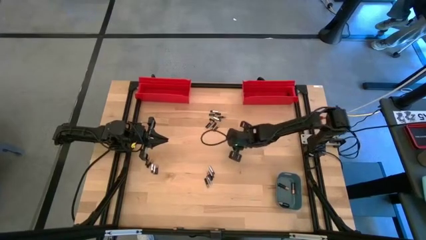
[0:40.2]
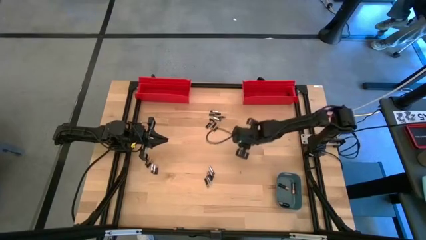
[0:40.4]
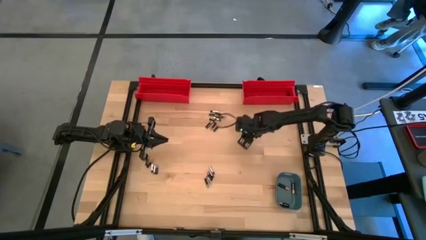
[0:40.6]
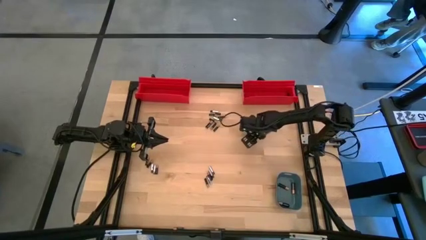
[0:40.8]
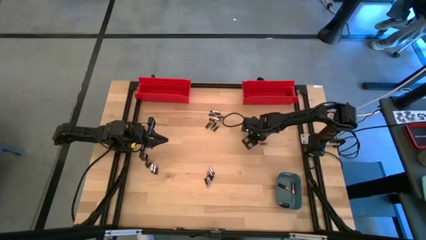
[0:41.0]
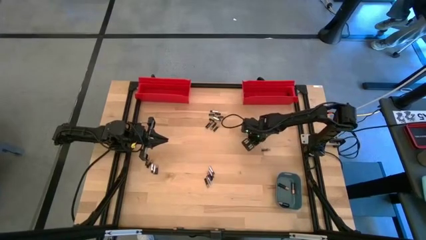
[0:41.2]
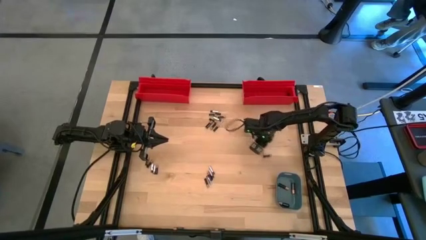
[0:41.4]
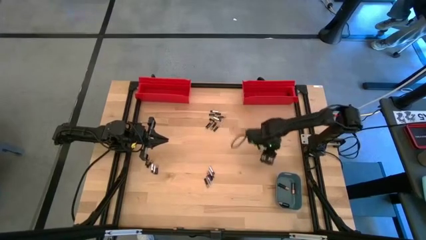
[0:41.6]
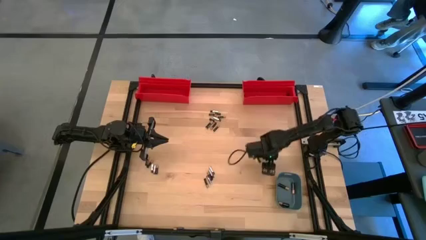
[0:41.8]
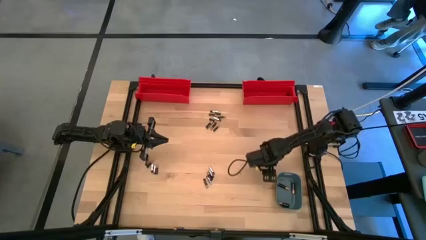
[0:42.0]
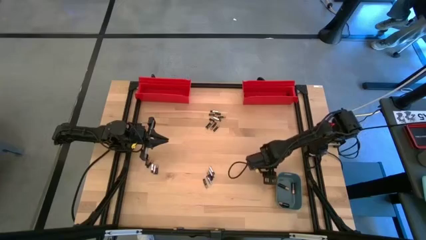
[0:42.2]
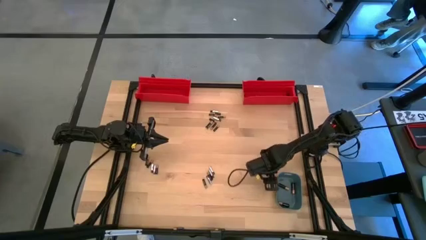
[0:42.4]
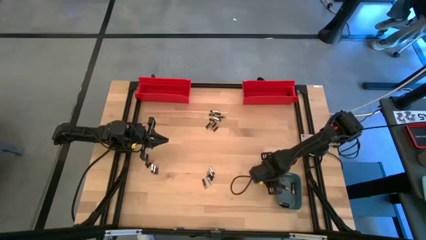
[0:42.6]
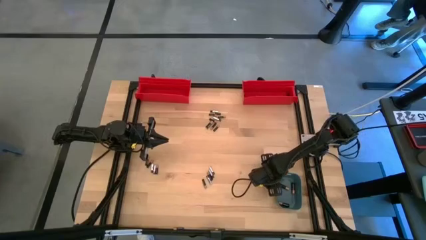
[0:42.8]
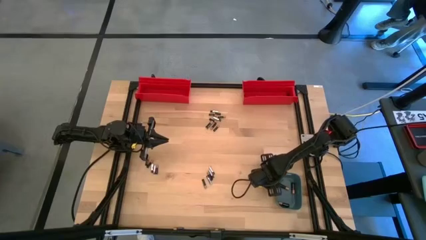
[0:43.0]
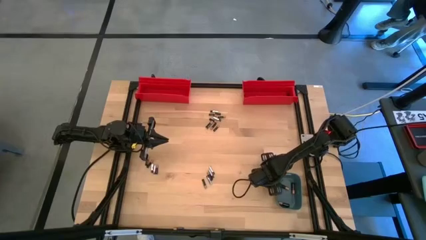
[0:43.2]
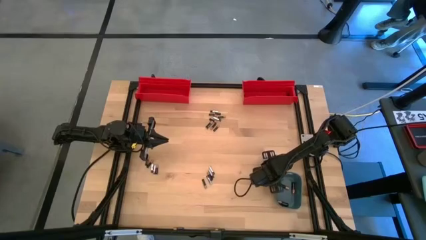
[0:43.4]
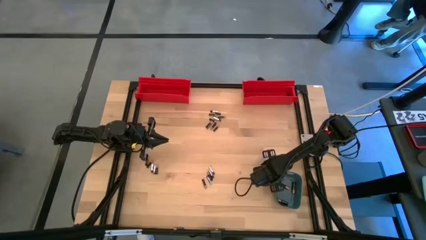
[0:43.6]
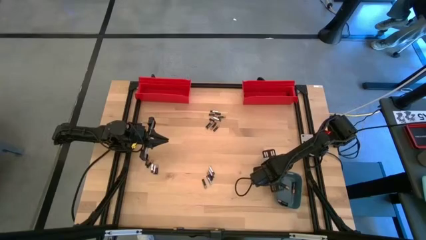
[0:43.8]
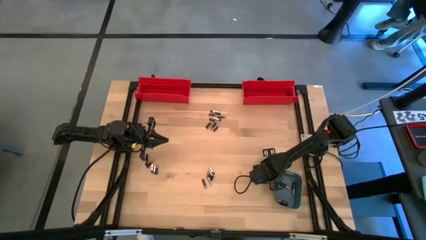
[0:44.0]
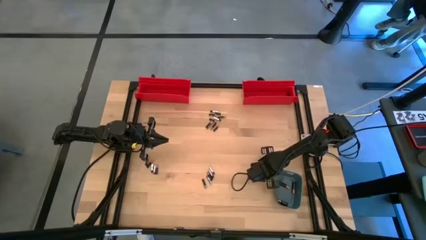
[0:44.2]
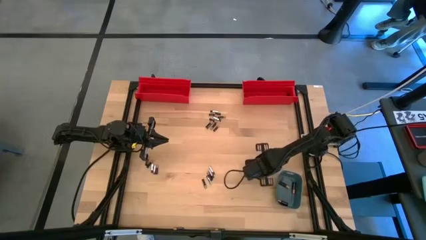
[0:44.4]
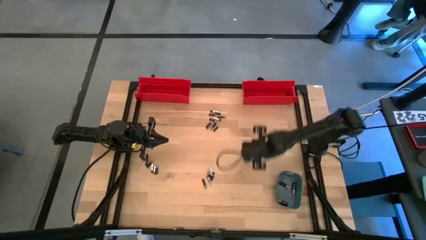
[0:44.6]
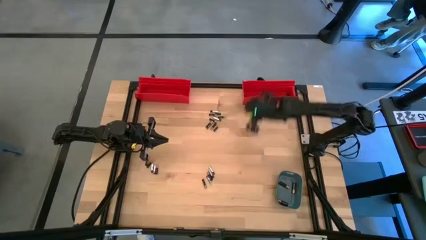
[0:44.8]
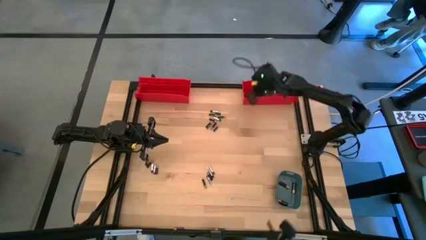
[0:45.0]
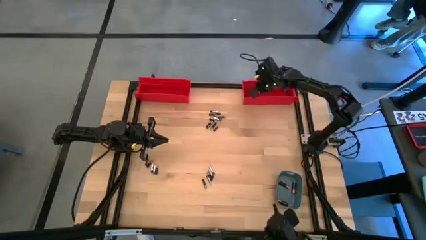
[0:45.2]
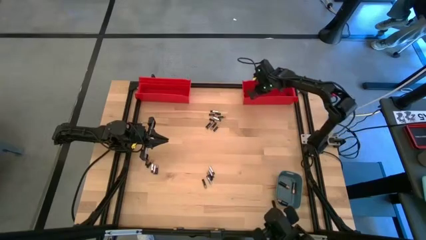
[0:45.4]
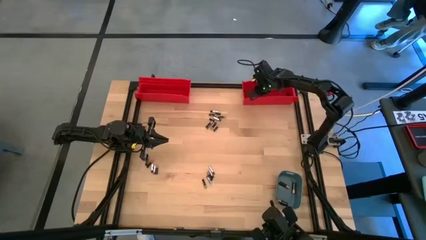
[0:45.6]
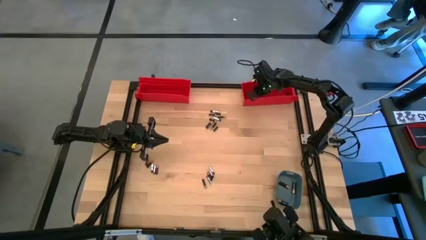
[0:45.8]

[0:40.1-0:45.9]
Task: Sort batteries
Put the small black battery into the right red bin

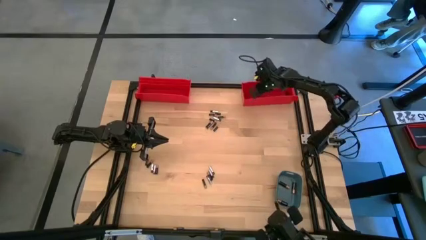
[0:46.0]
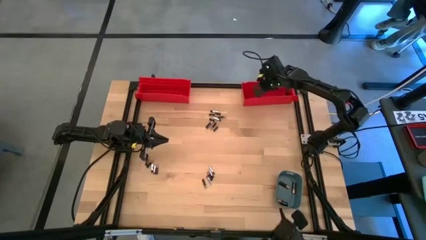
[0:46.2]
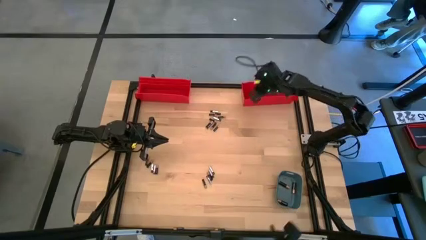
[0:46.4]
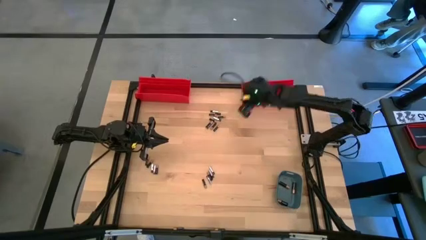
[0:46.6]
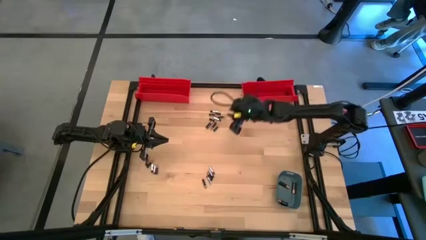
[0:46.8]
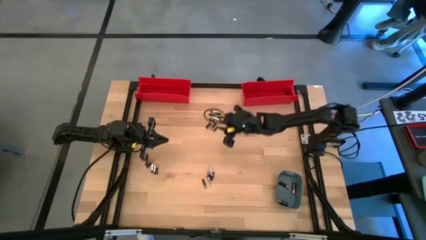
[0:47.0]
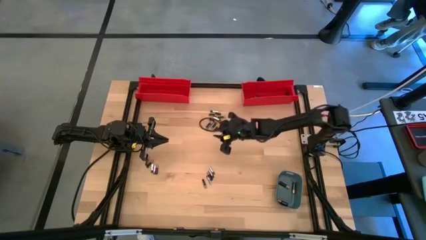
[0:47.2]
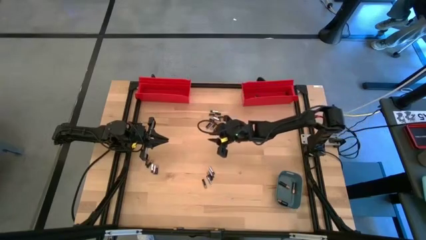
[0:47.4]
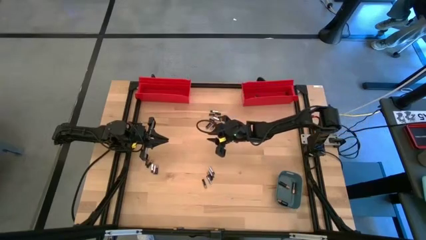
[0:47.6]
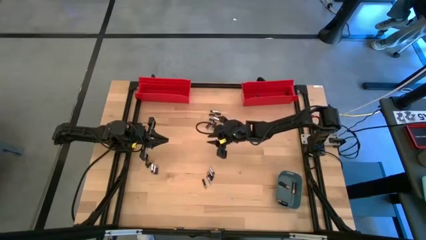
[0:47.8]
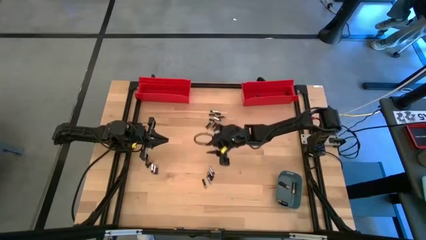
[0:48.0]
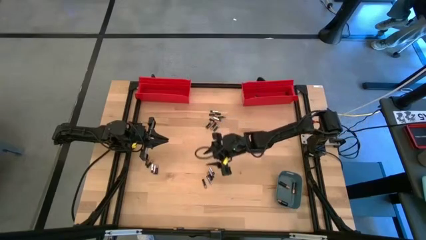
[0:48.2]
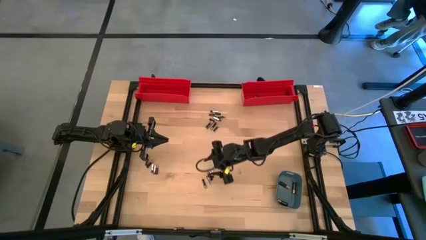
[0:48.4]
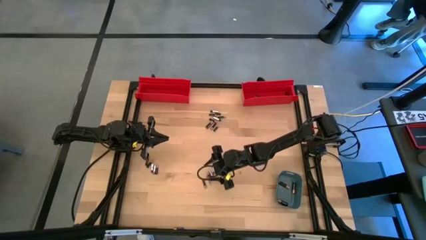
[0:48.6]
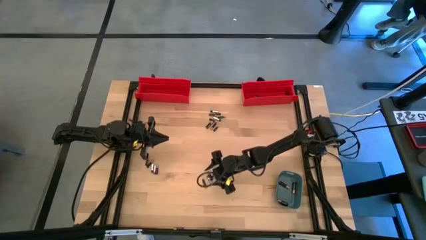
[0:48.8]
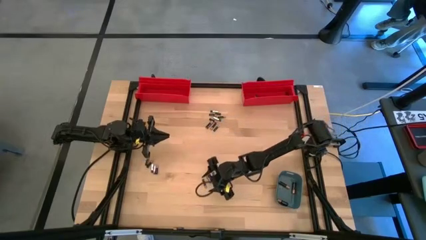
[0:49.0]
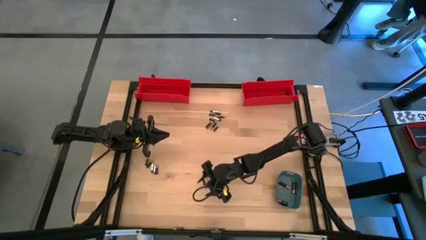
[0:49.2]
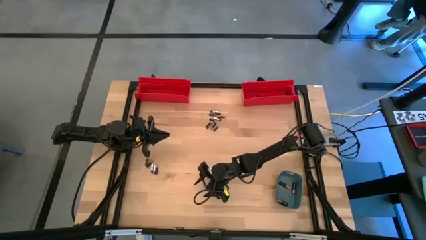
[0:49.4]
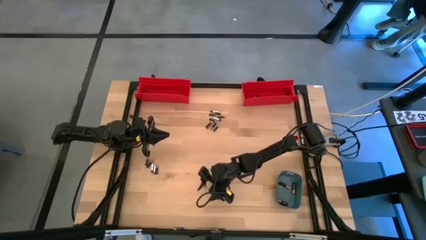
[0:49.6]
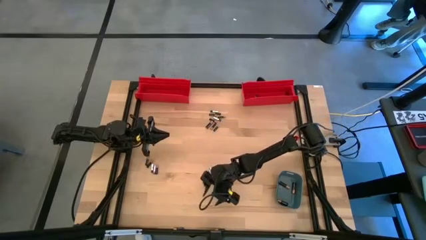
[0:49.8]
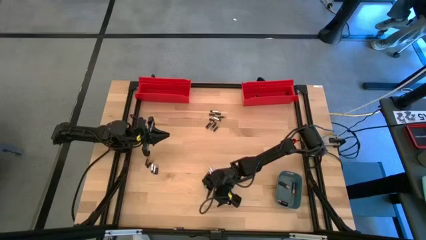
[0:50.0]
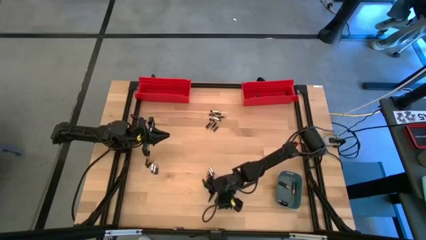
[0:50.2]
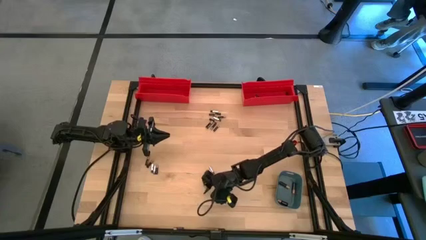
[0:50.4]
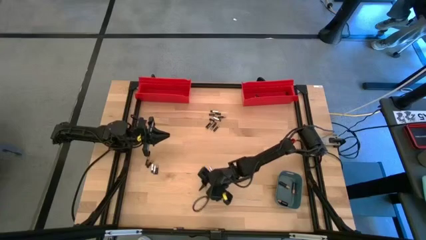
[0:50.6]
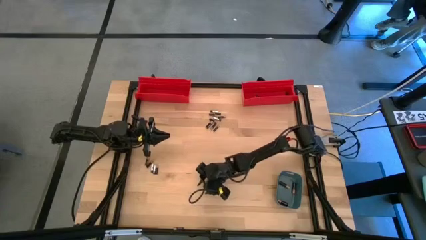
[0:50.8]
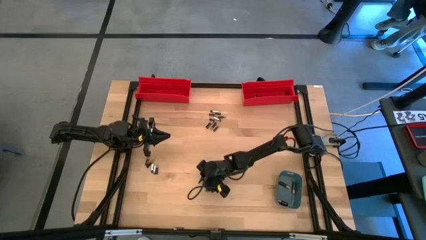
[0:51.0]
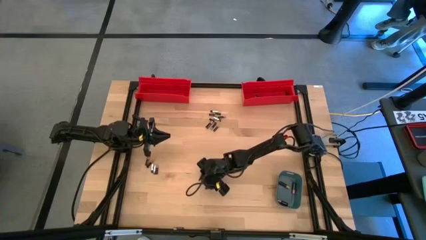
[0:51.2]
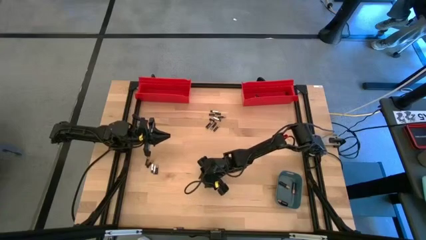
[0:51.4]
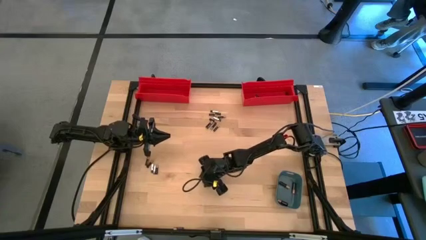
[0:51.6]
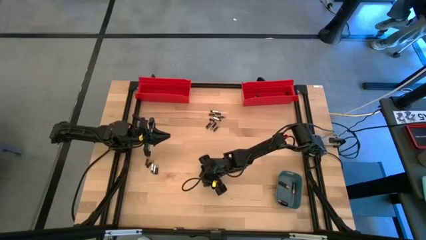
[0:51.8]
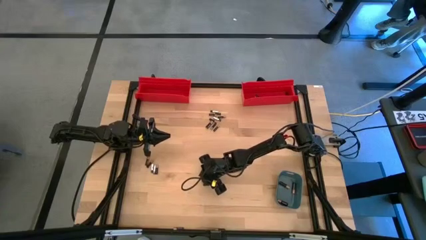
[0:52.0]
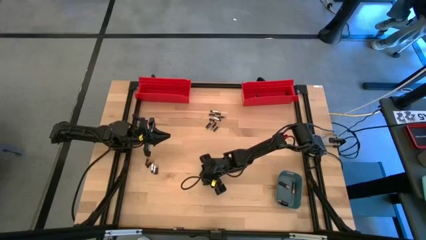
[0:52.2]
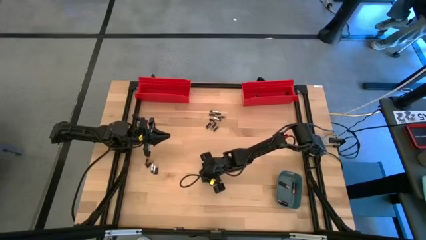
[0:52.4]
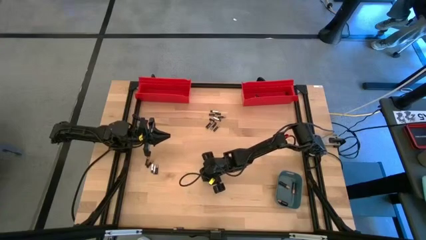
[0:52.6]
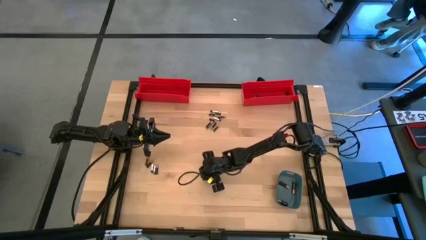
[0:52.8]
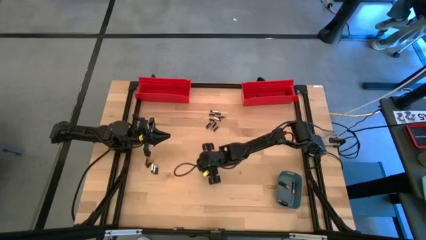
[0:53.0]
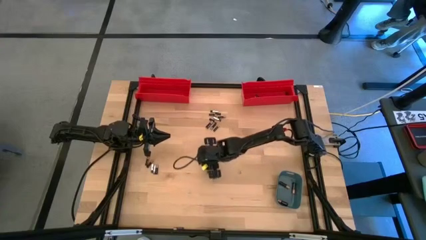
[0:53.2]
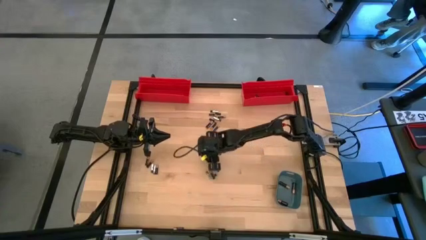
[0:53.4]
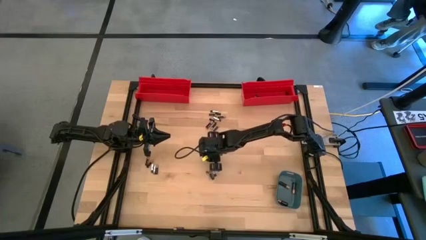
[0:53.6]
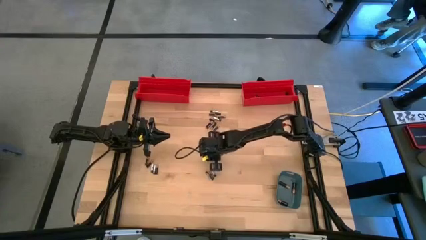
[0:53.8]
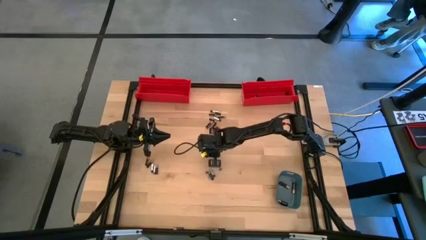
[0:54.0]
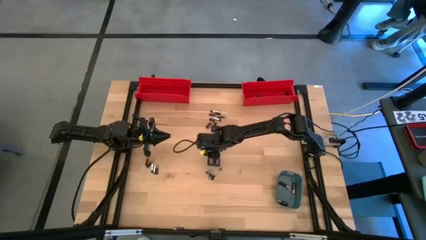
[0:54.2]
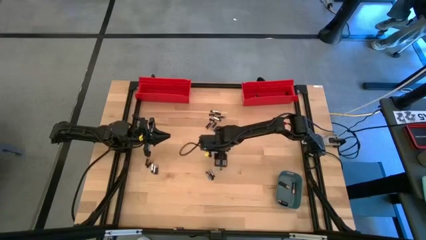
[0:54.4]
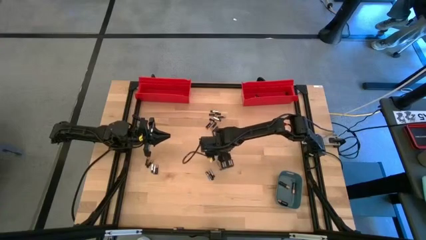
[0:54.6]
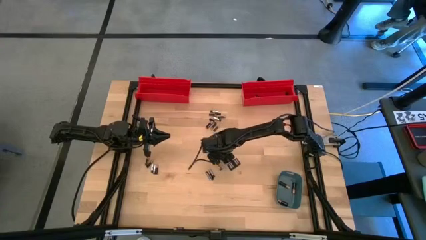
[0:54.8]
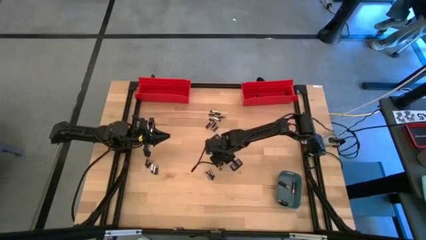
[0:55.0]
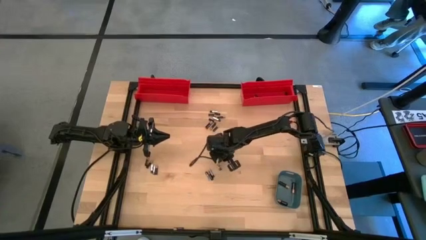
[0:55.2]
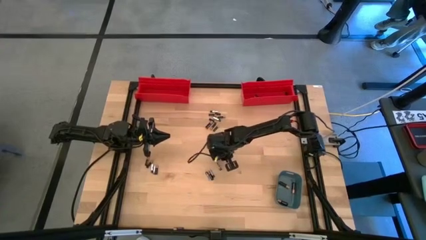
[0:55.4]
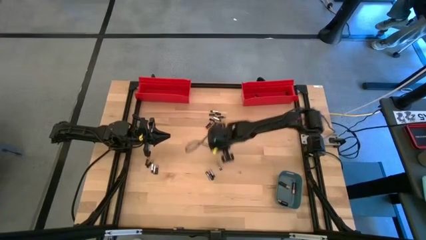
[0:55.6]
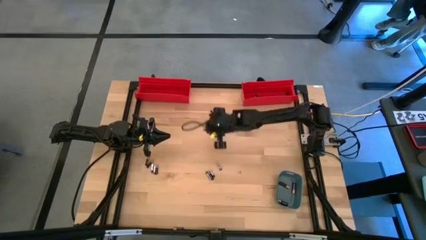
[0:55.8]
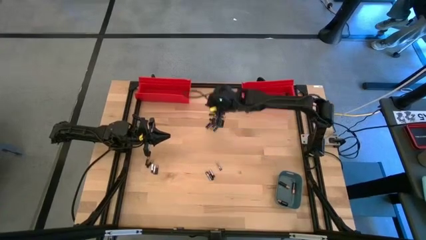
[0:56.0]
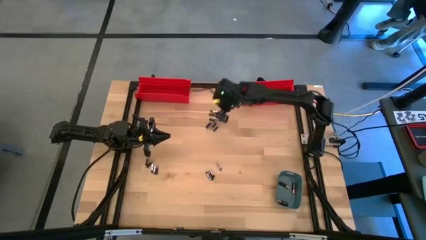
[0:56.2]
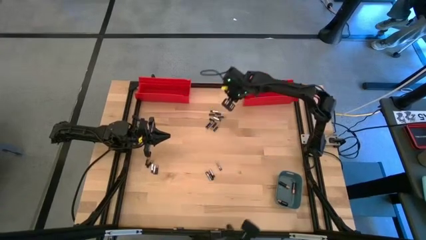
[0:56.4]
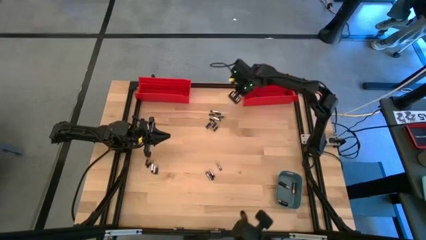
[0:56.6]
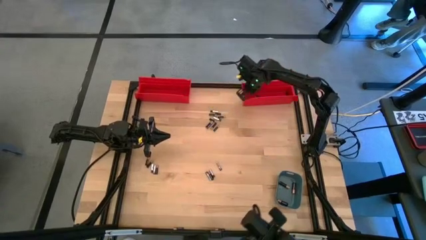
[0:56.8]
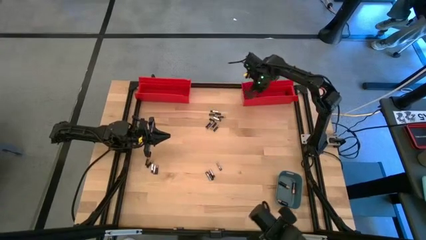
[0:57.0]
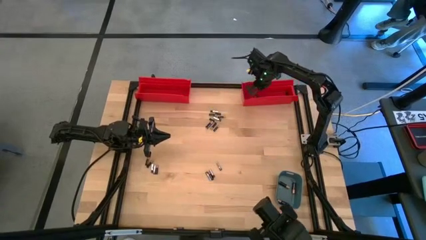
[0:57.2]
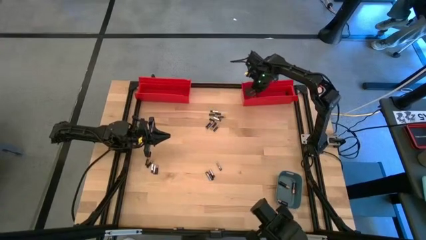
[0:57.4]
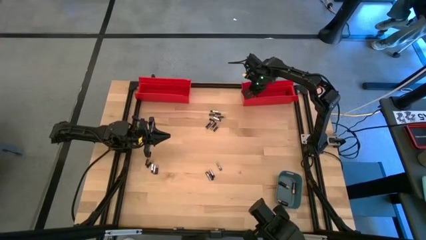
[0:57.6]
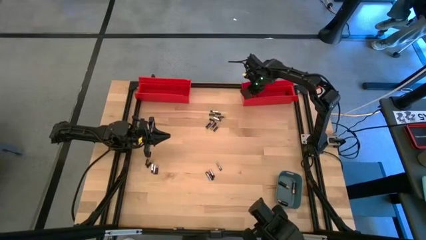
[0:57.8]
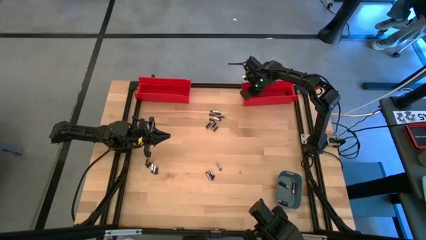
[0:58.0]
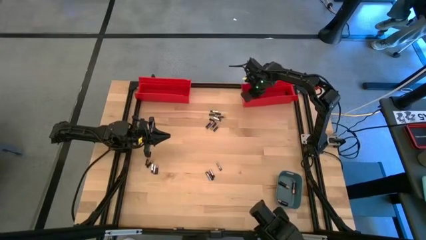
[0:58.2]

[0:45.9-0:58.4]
Put the small black battery into the right red bin
